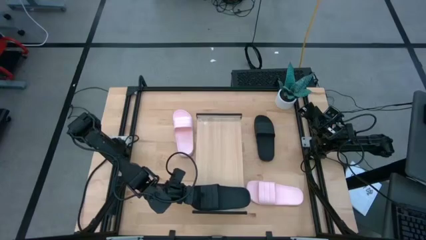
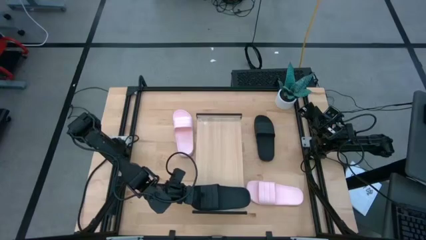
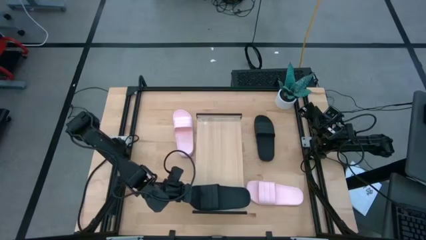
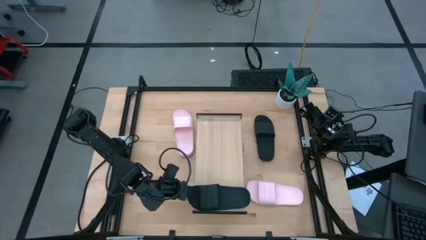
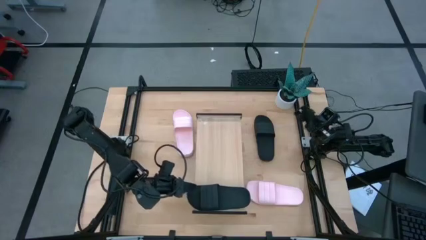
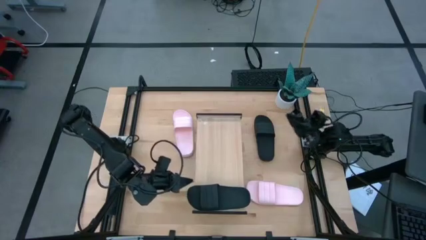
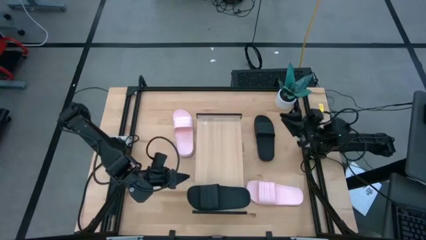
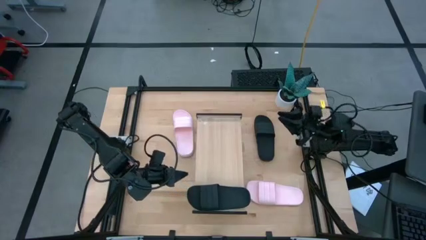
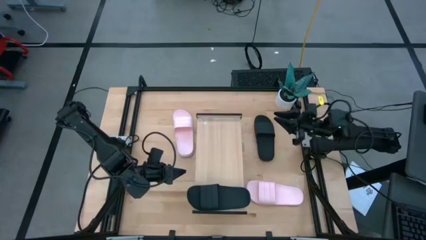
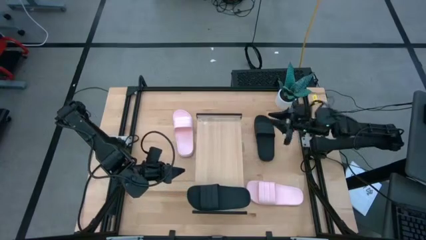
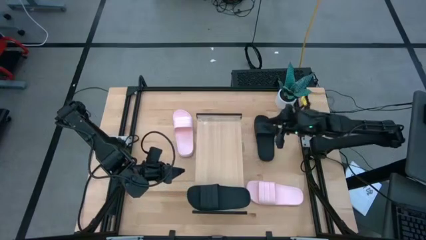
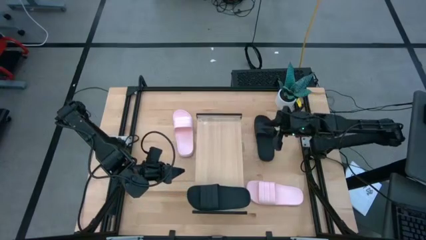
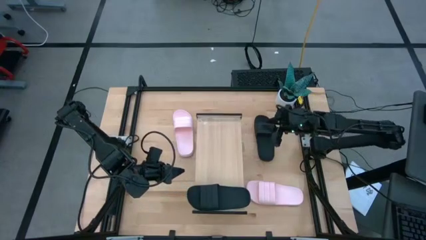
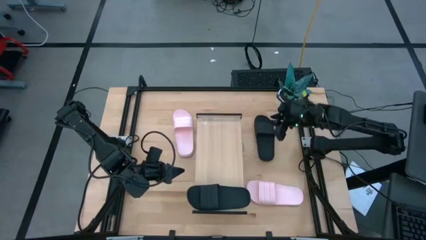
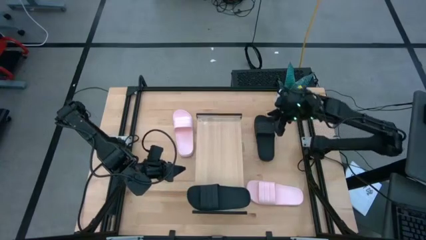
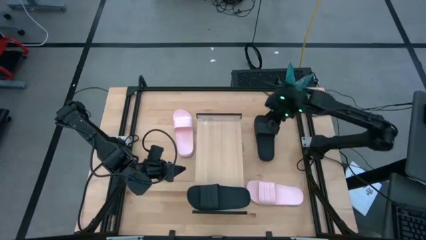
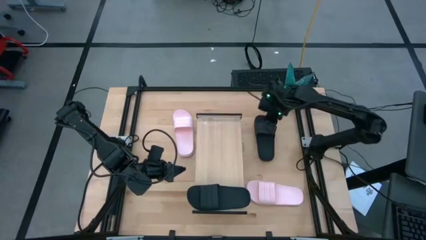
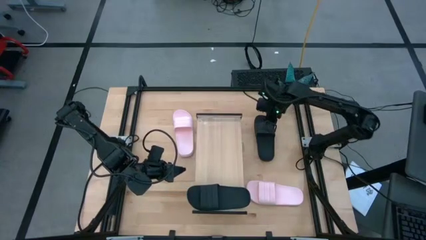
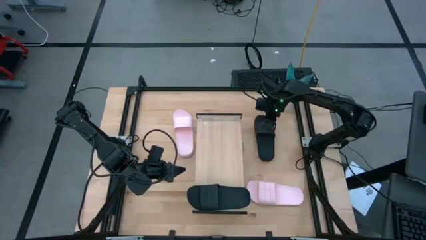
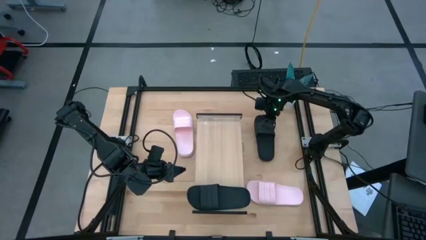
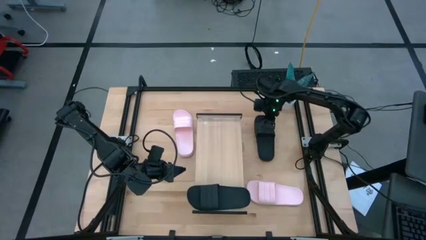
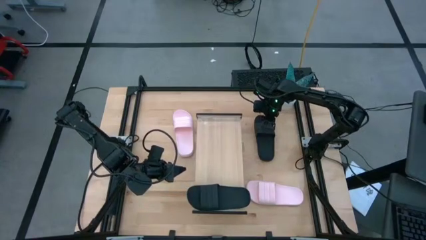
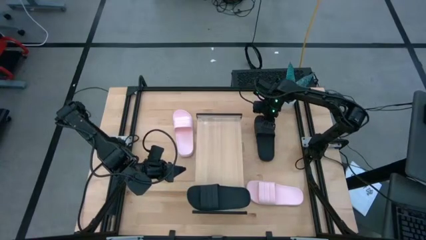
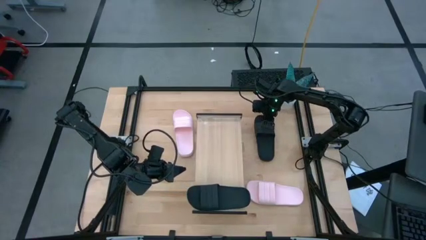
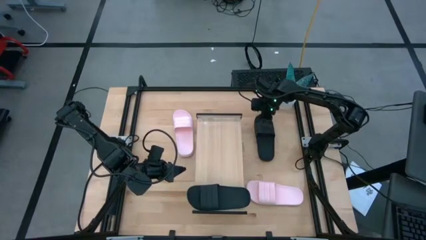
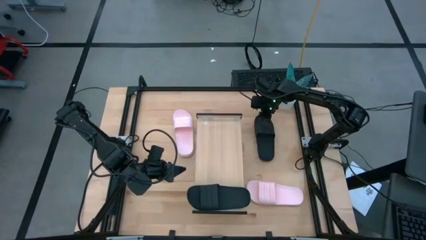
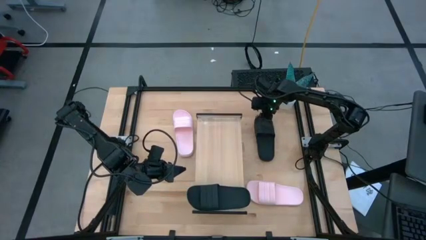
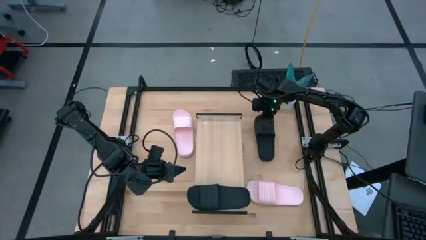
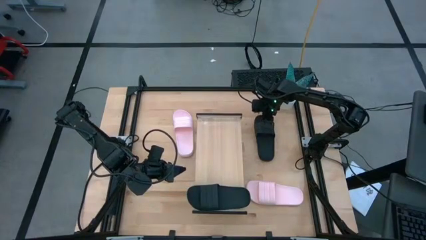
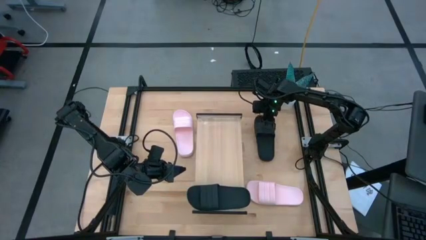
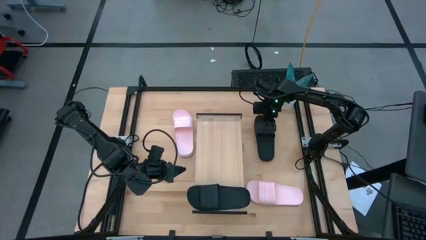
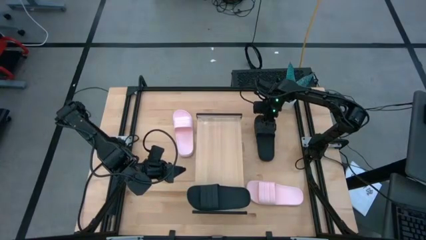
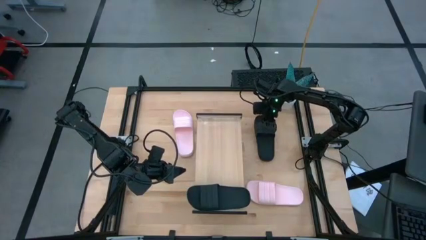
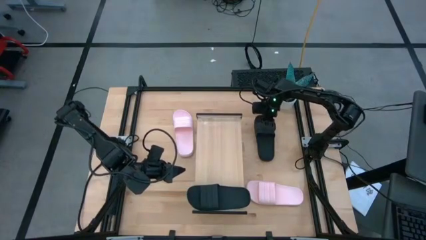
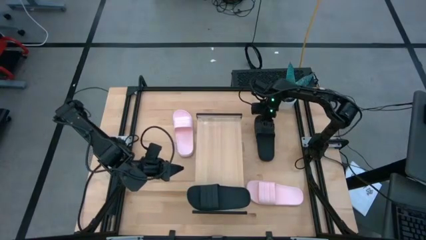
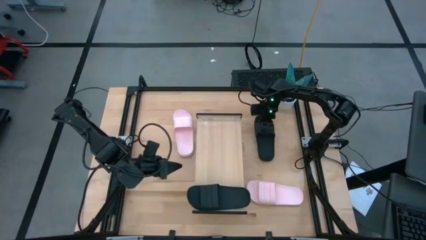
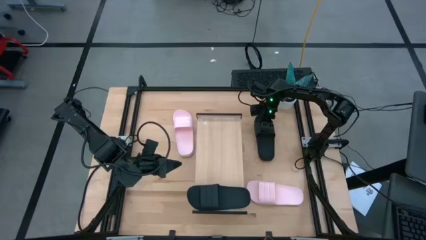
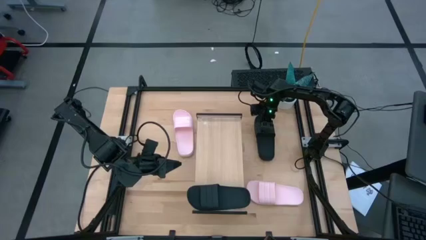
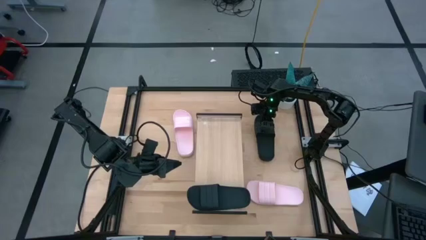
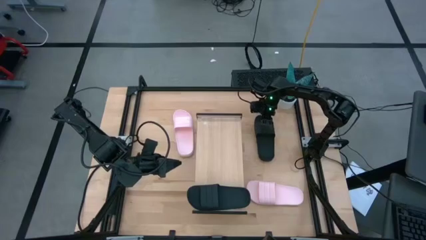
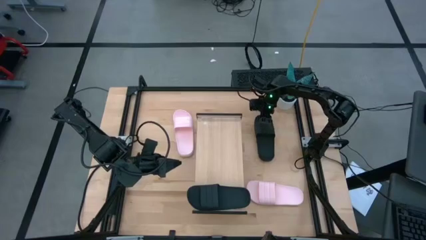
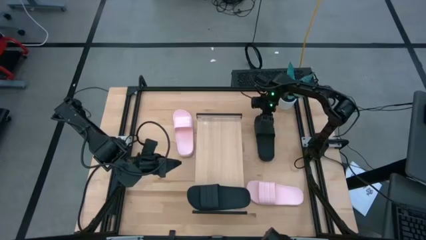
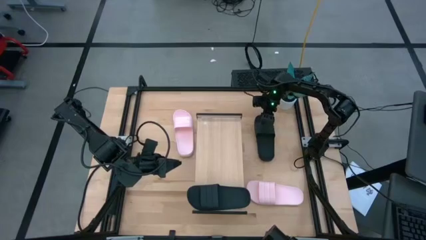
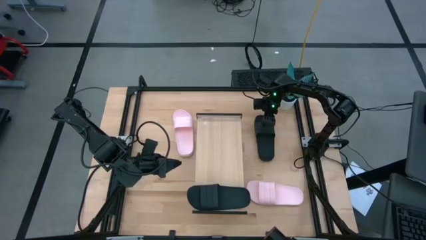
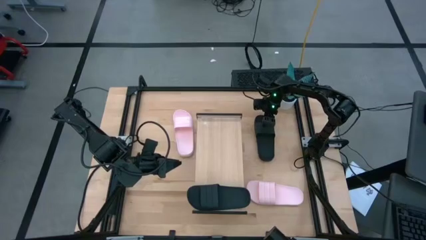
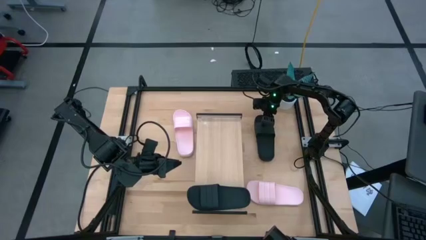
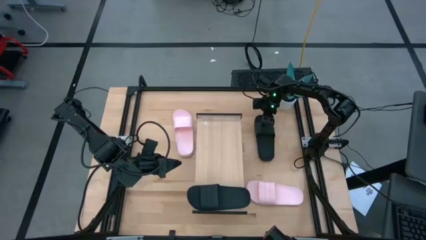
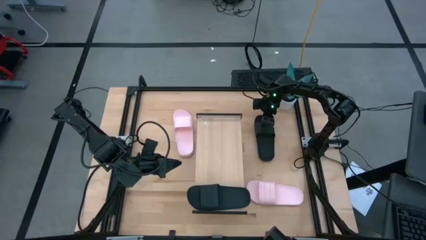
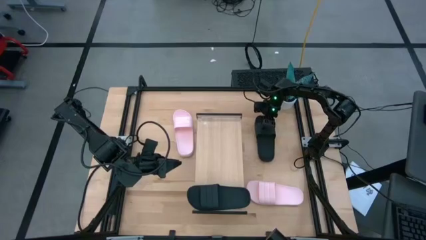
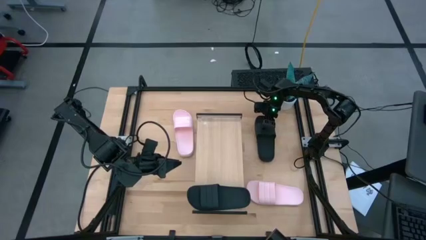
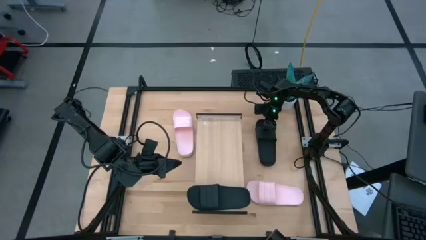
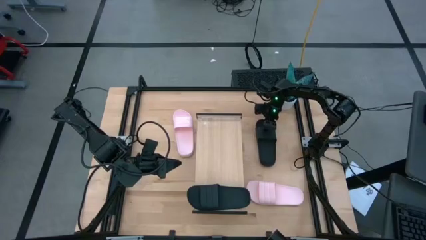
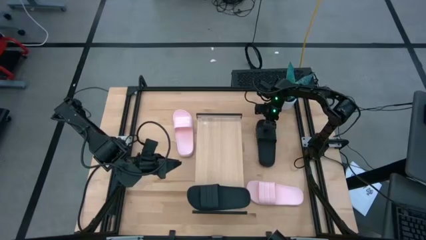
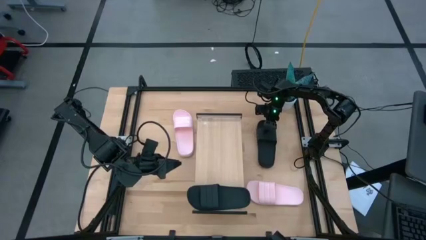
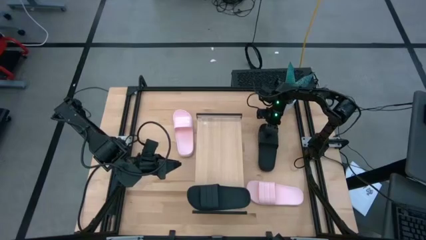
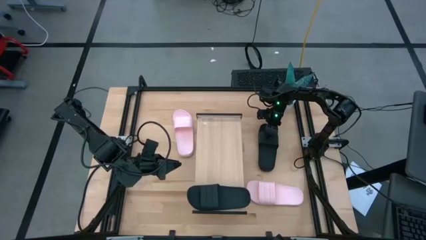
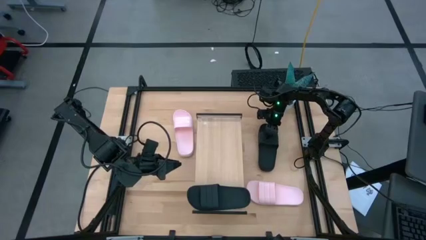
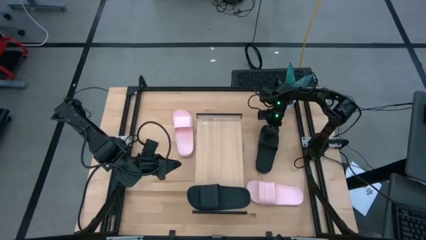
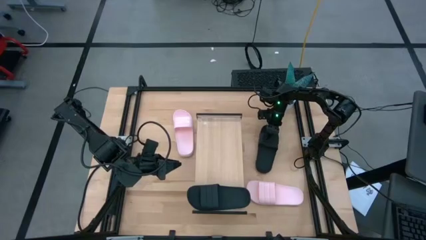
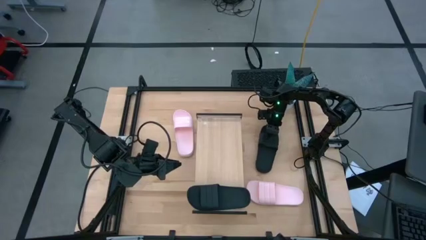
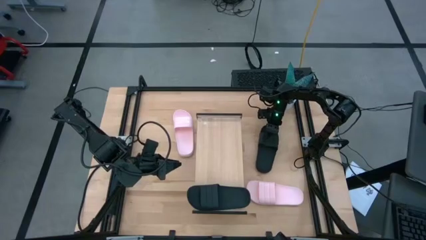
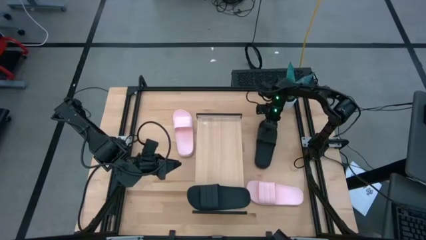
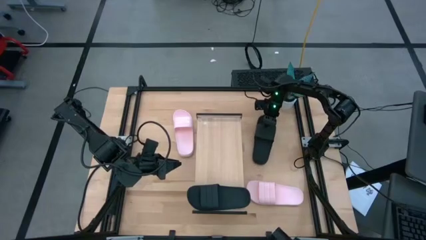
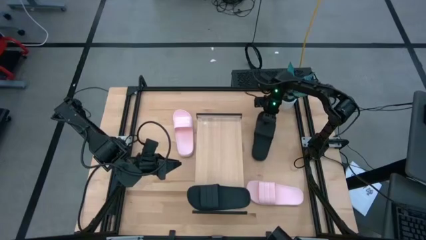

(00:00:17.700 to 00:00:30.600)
Task: Pick and place slides into the shelf
Put the black slides on the shelf
